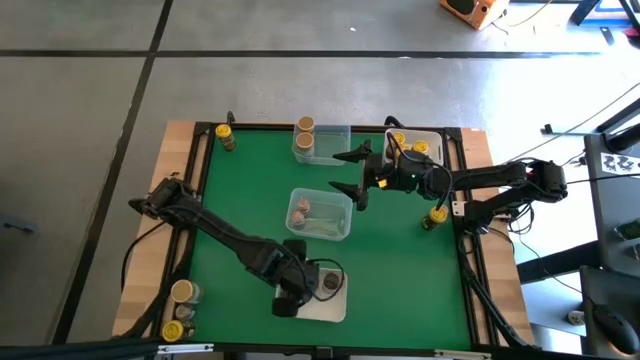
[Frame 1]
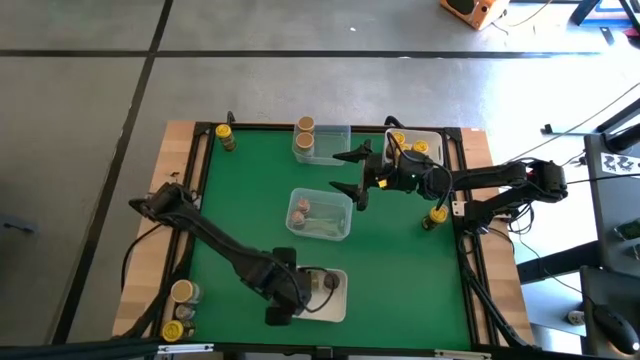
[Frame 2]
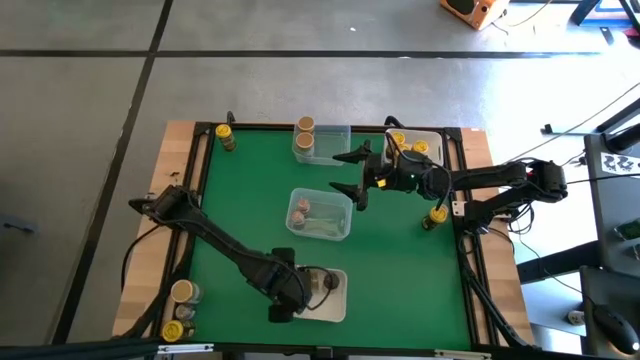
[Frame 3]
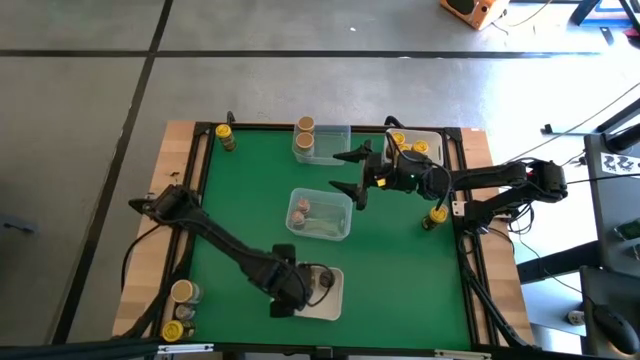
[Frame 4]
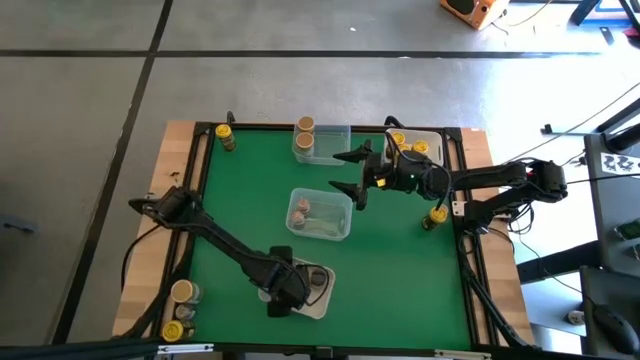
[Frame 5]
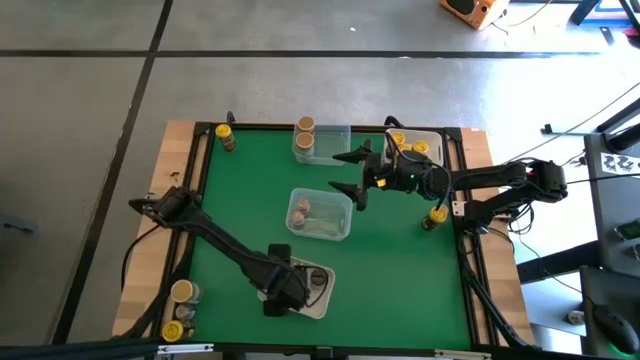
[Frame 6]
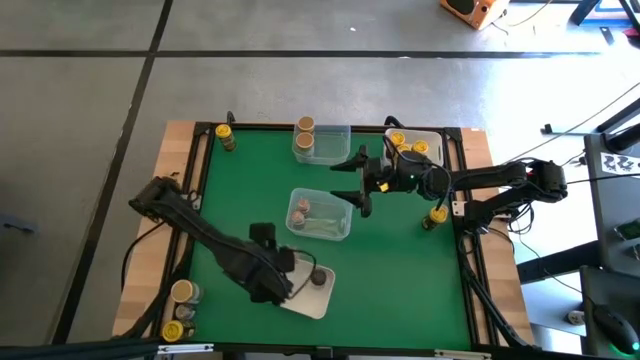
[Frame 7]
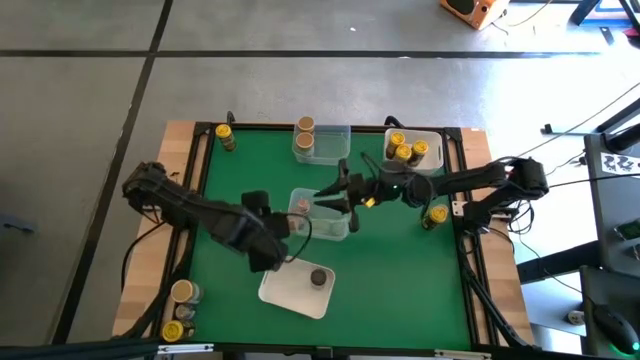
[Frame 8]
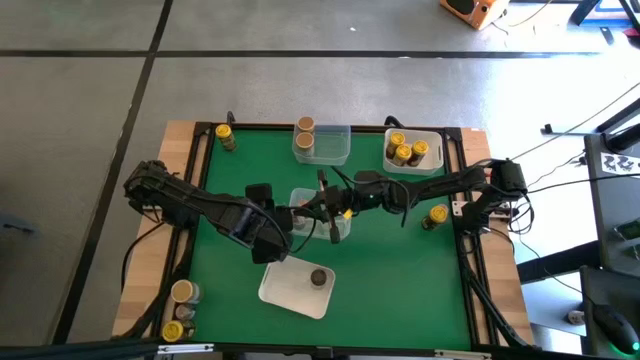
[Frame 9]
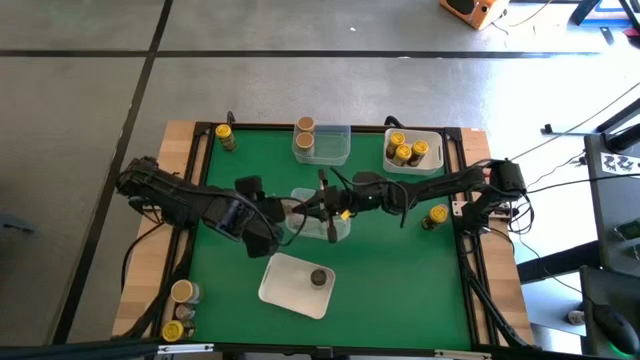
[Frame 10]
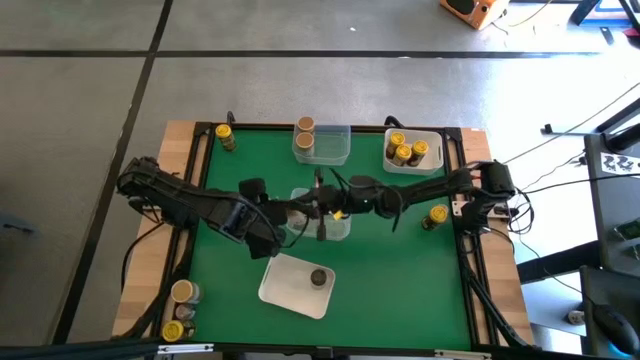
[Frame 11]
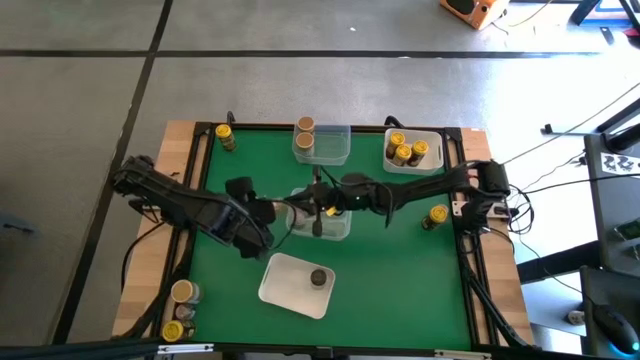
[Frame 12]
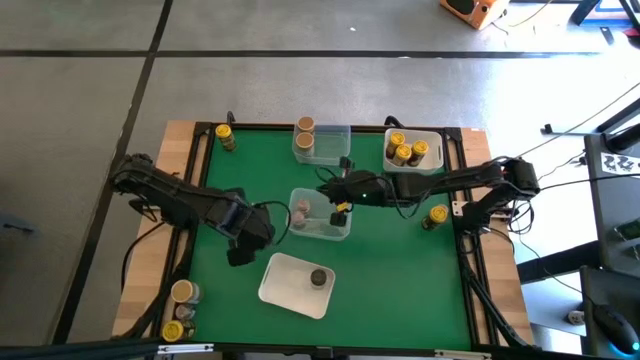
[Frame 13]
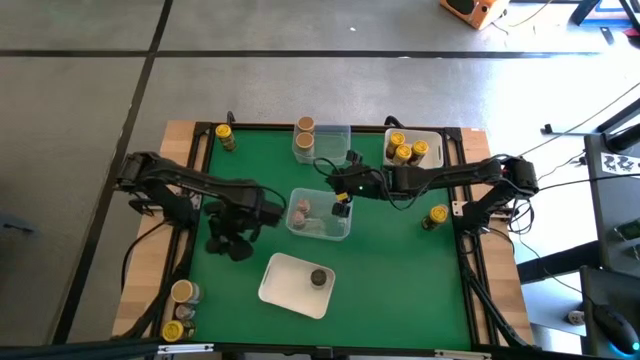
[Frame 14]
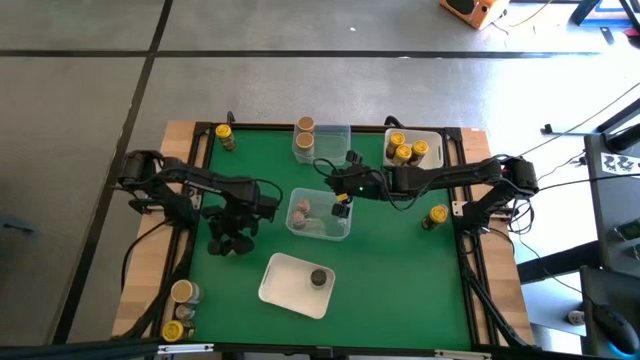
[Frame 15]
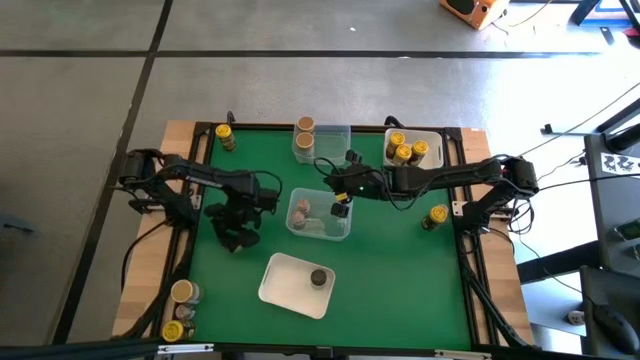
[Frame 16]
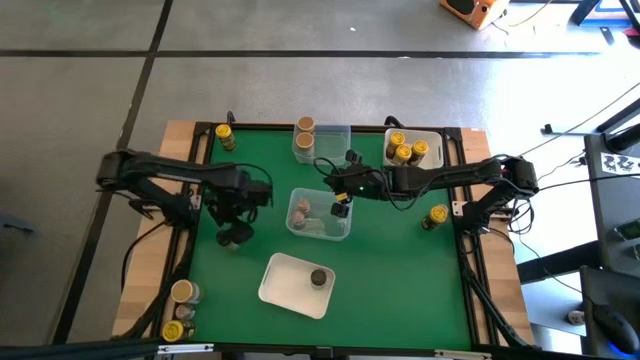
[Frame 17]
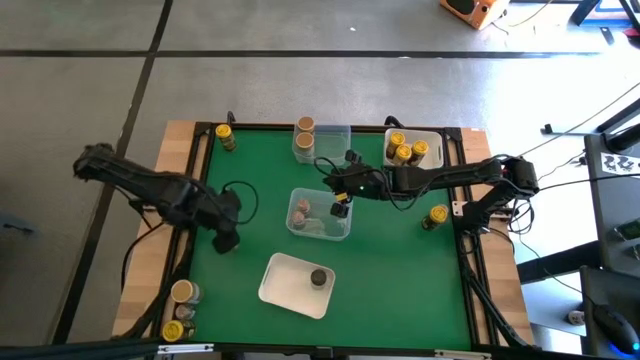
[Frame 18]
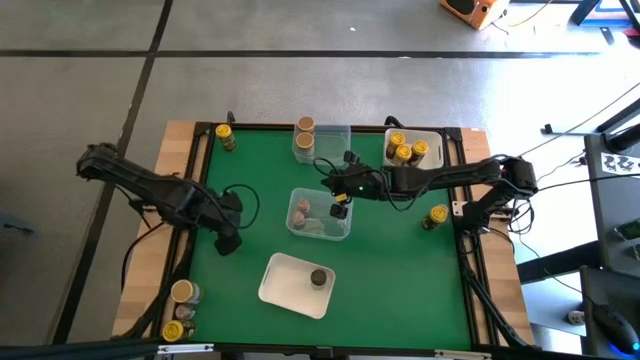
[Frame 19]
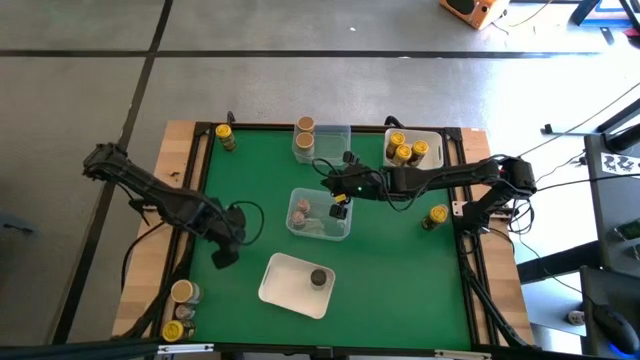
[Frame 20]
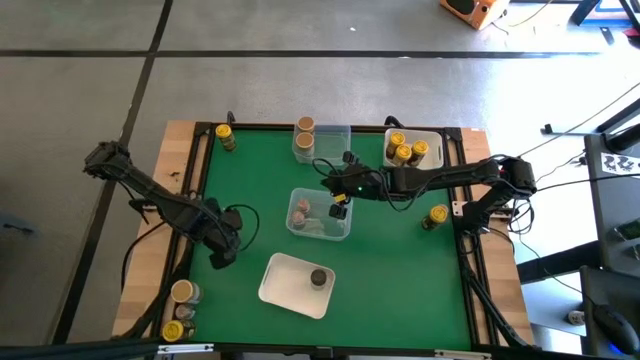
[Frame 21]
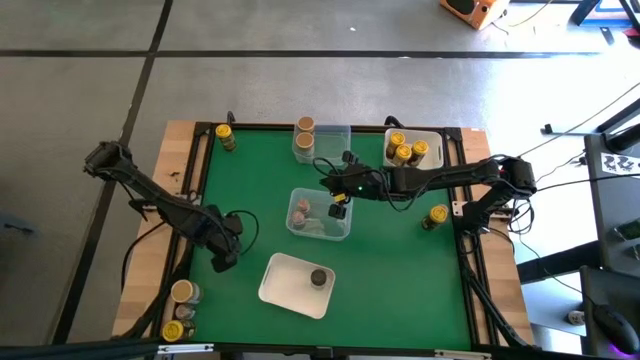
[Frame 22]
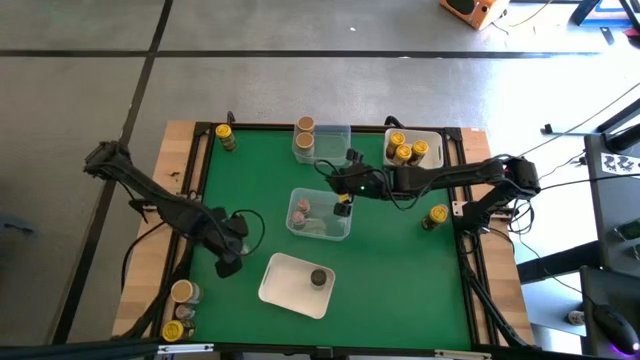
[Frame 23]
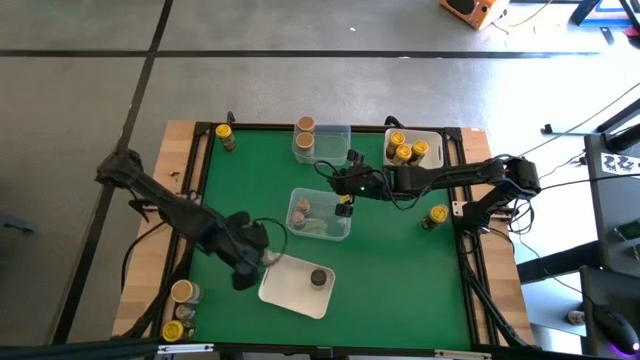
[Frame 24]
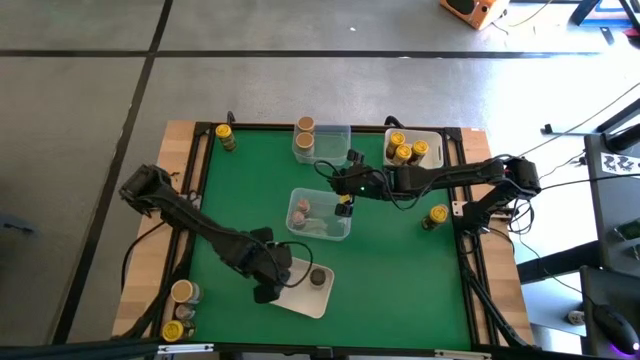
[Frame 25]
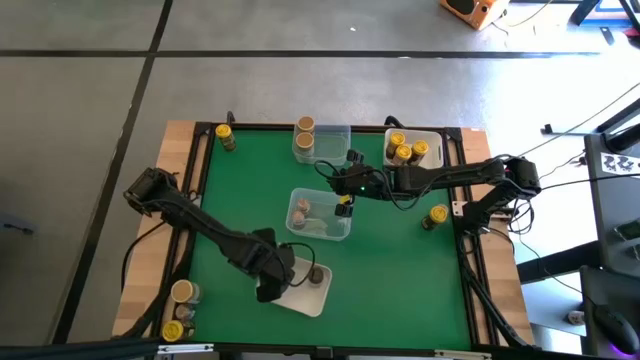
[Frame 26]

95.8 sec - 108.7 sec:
Task: Sort spices by type
Put the black seasoning bottle into the bottom white bin

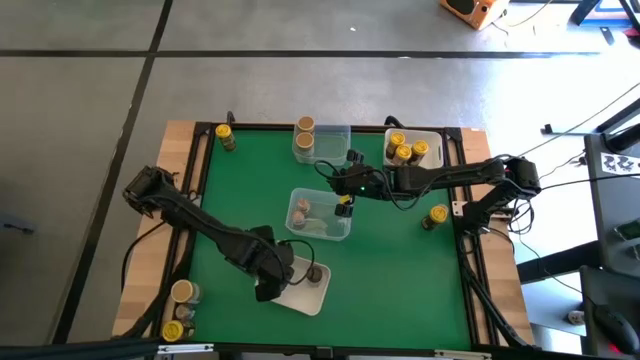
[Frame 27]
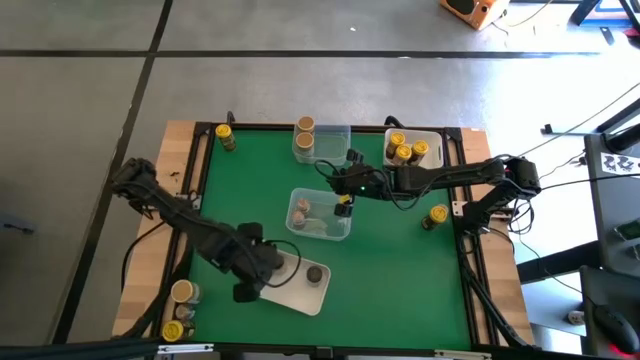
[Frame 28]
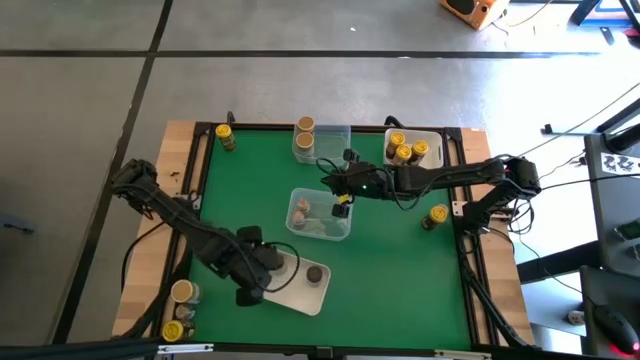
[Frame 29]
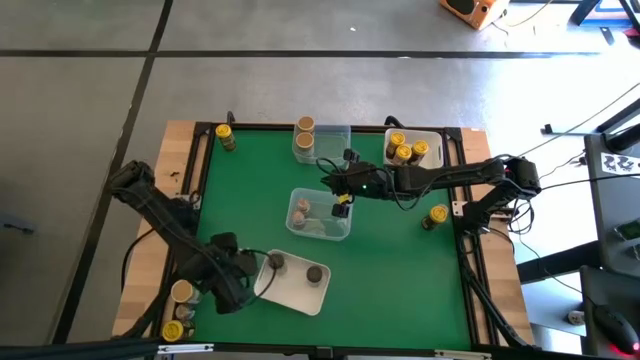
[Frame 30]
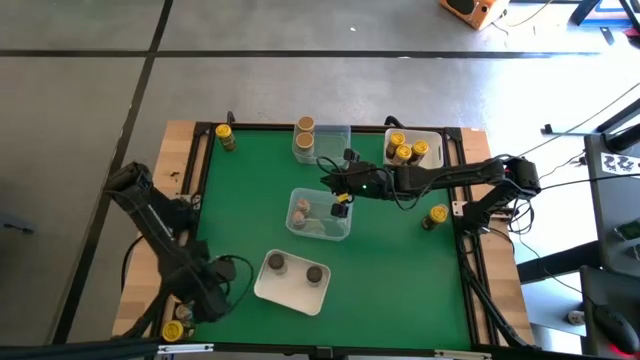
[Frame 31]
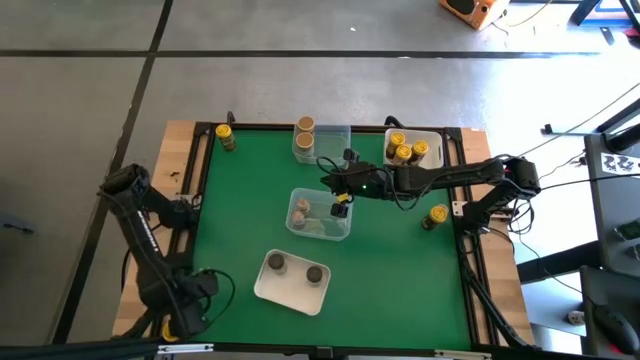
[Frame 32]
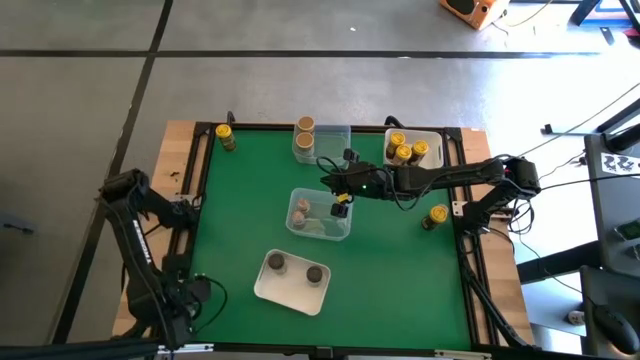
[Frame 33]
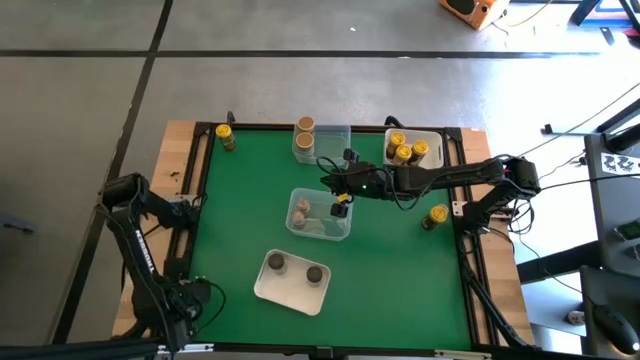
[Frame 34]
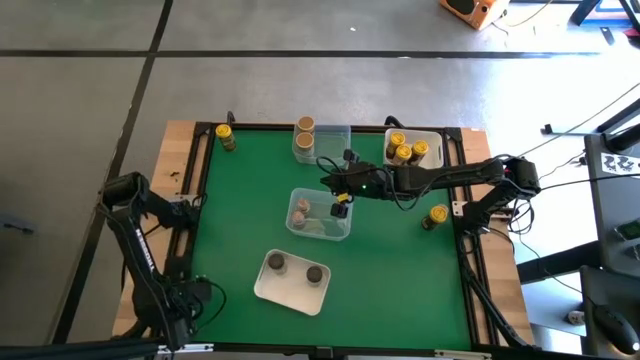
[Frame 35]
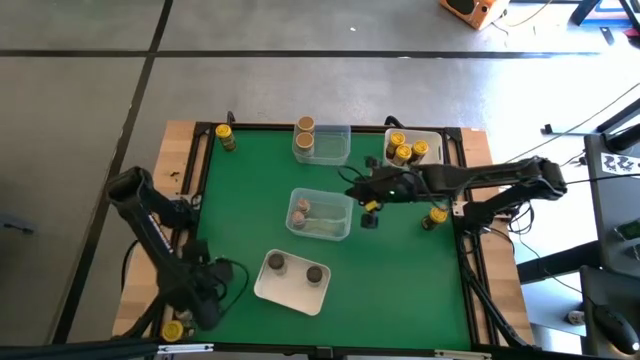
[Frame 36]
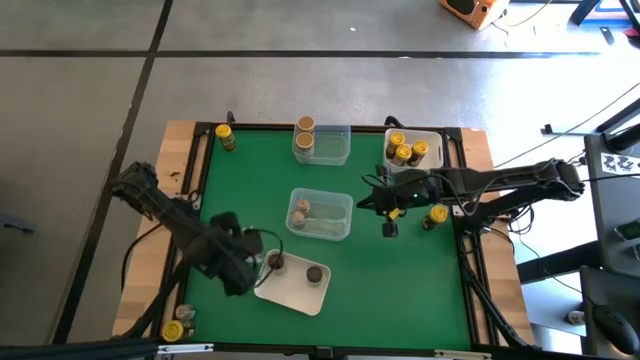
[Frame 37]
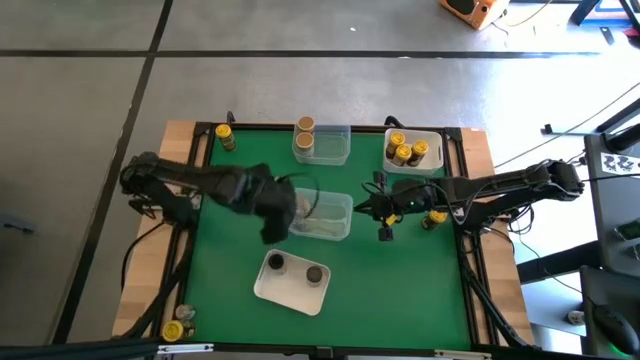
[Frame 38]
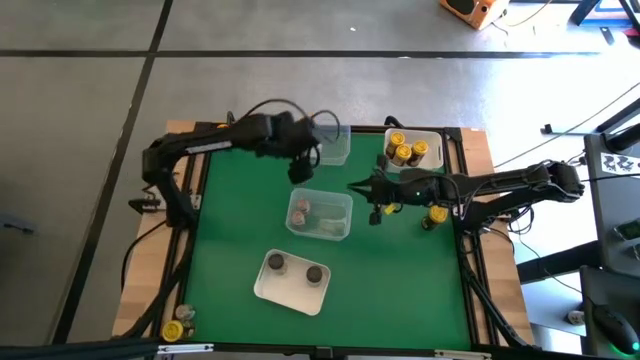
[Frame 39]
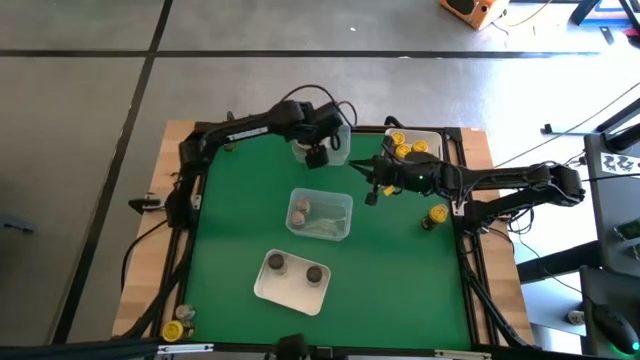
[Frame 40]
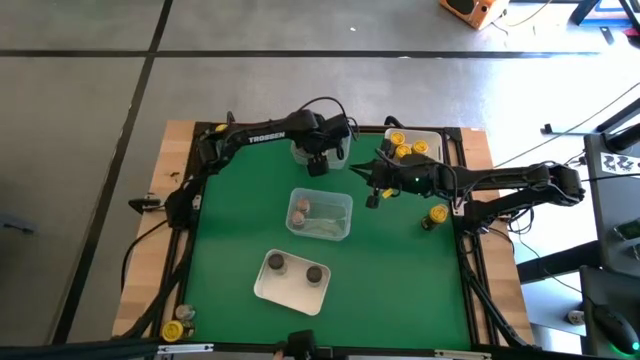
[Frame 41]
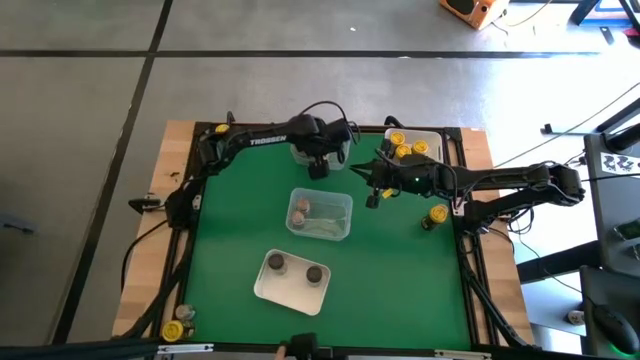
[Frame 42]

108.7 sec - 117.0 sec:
Put the brown seasoning bottle into the top transparent bin
